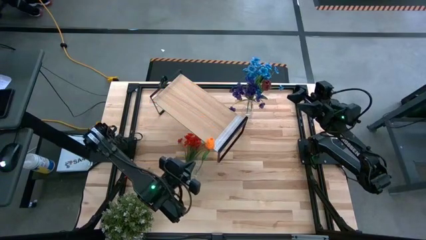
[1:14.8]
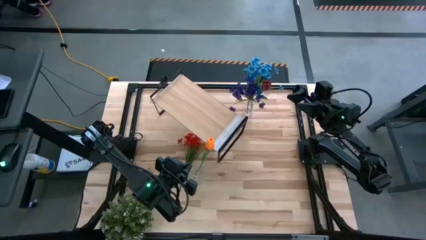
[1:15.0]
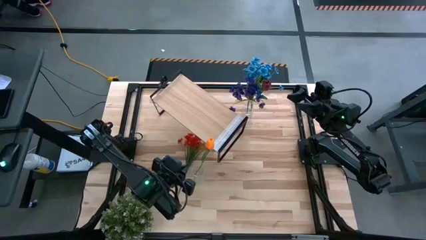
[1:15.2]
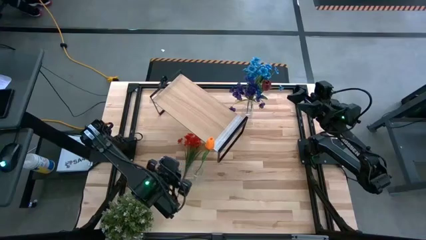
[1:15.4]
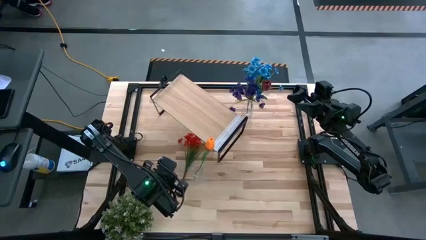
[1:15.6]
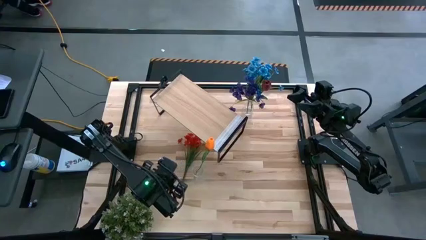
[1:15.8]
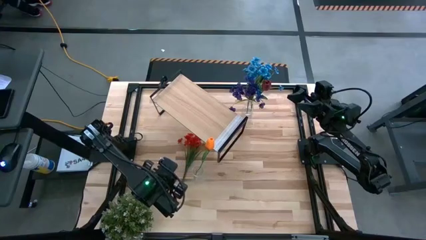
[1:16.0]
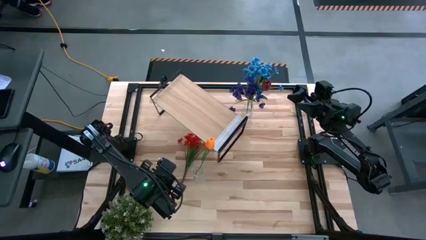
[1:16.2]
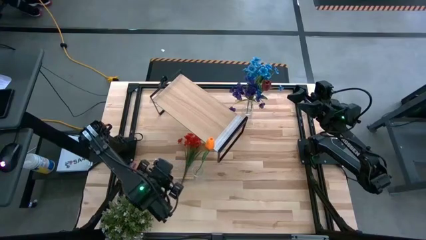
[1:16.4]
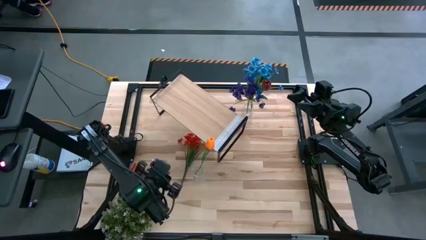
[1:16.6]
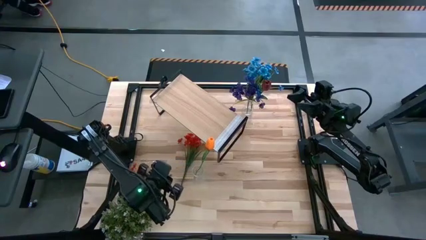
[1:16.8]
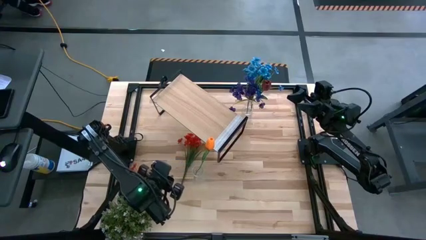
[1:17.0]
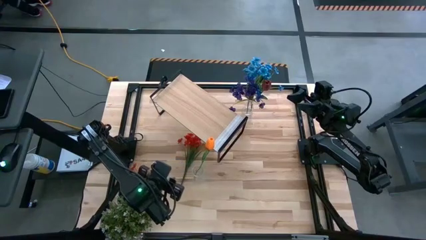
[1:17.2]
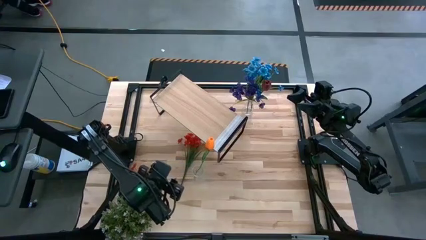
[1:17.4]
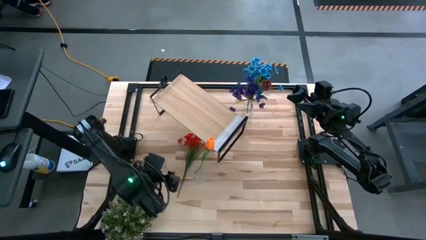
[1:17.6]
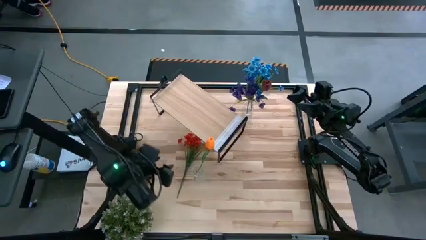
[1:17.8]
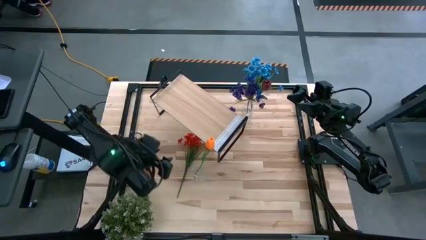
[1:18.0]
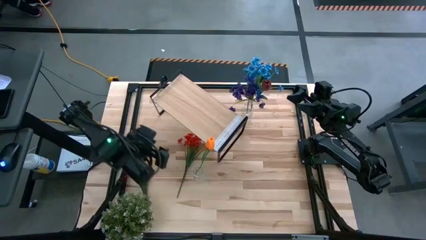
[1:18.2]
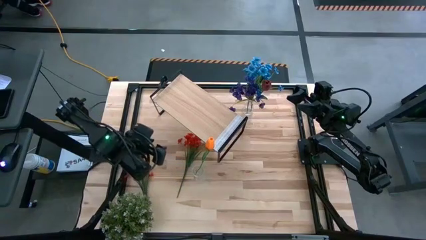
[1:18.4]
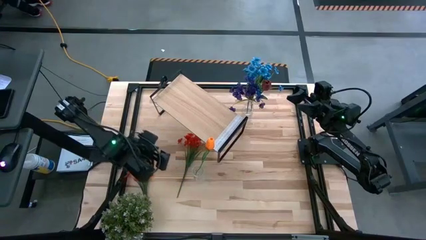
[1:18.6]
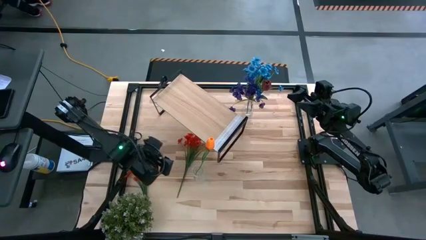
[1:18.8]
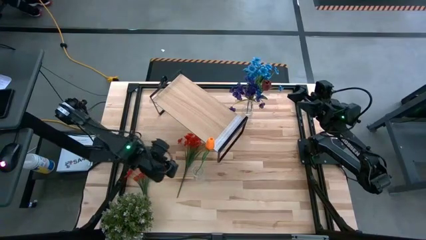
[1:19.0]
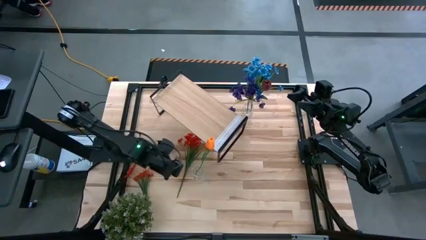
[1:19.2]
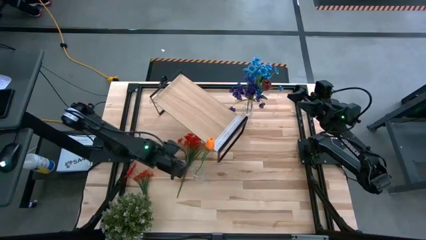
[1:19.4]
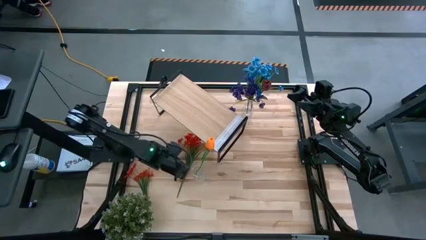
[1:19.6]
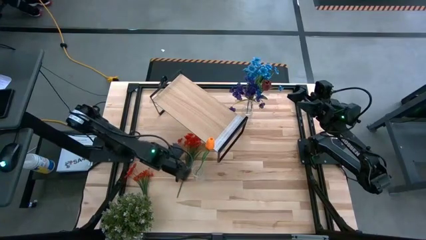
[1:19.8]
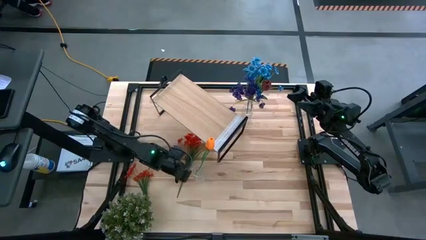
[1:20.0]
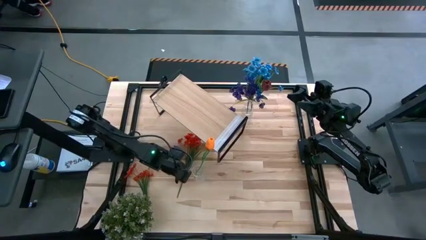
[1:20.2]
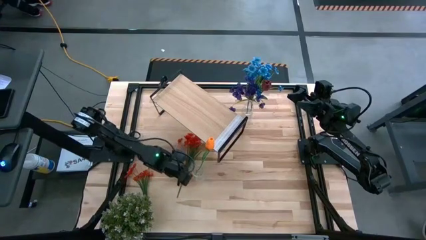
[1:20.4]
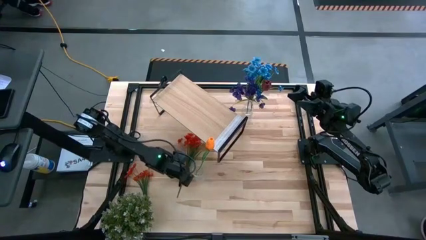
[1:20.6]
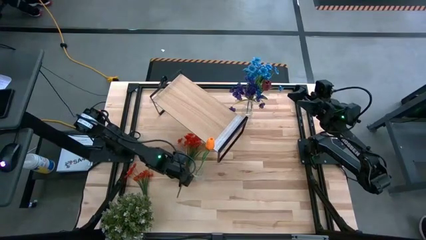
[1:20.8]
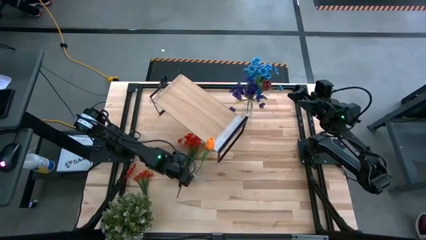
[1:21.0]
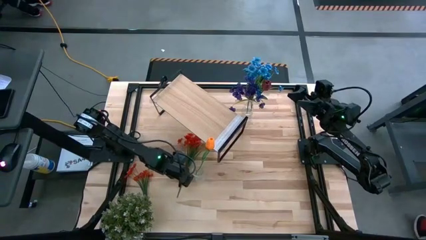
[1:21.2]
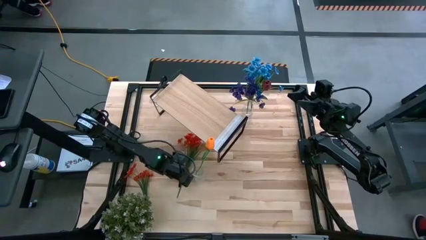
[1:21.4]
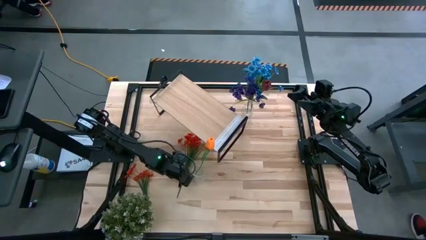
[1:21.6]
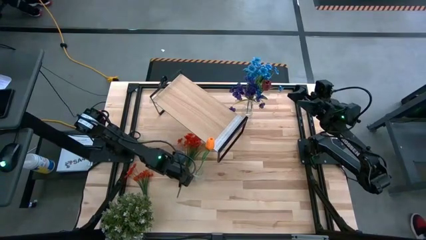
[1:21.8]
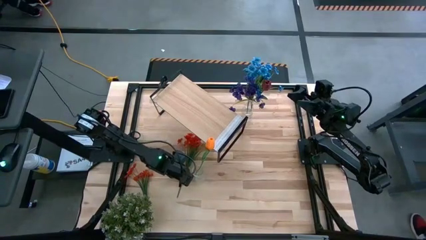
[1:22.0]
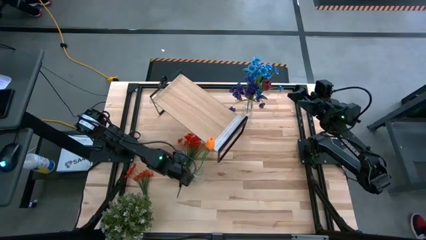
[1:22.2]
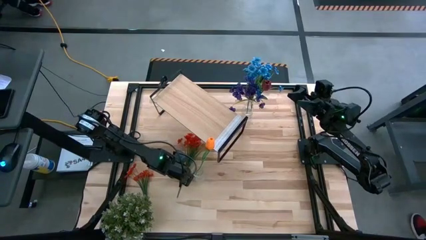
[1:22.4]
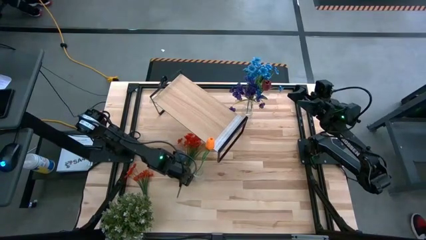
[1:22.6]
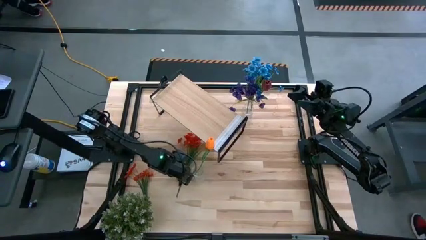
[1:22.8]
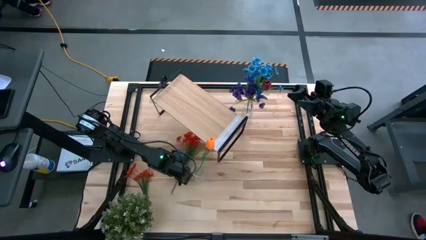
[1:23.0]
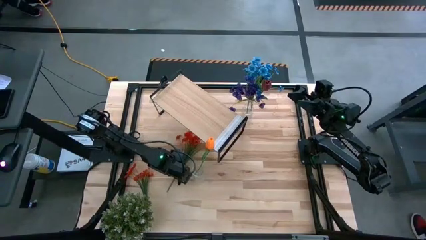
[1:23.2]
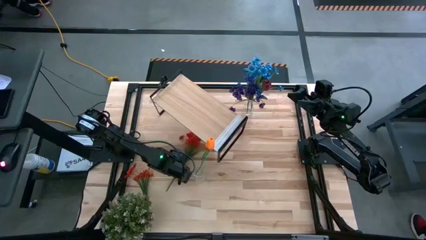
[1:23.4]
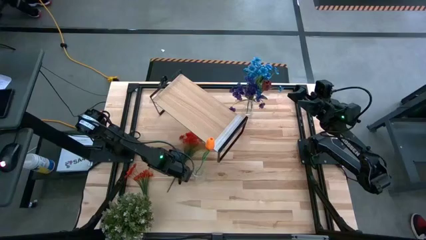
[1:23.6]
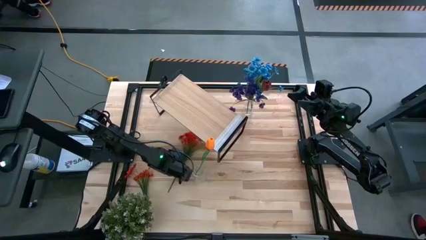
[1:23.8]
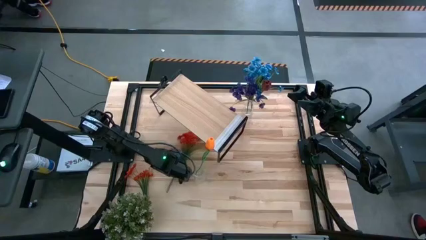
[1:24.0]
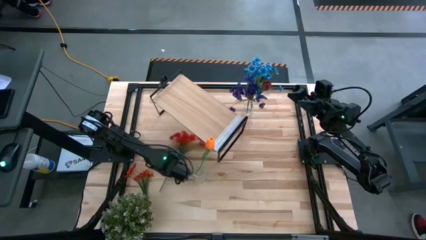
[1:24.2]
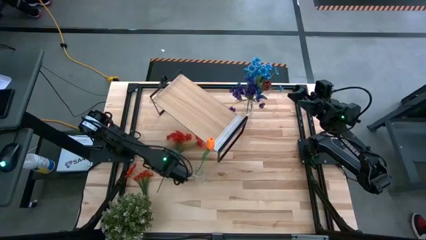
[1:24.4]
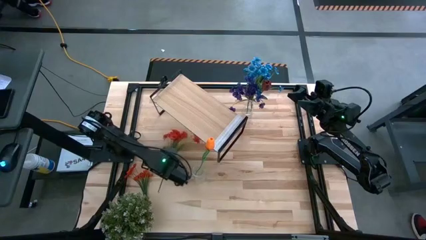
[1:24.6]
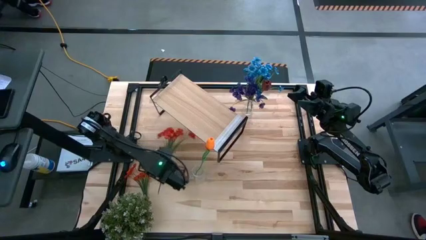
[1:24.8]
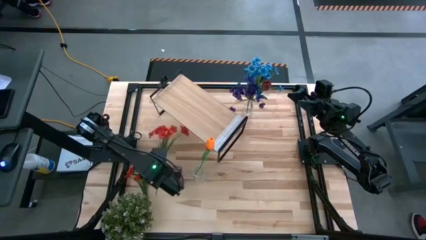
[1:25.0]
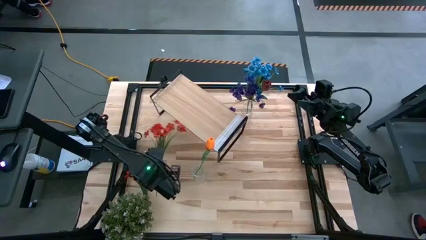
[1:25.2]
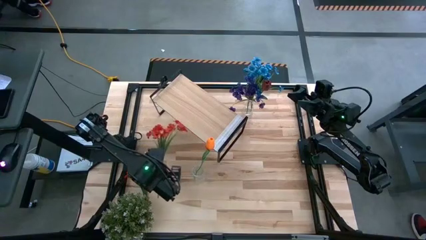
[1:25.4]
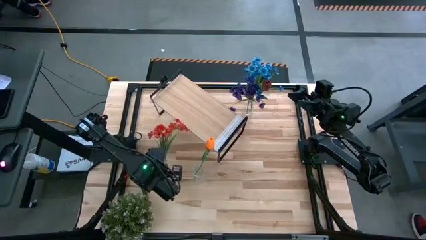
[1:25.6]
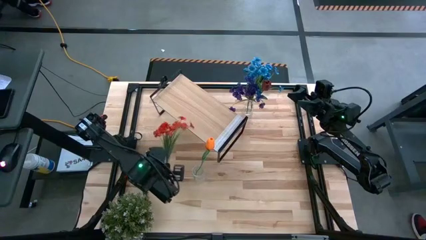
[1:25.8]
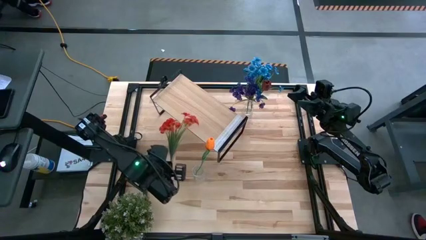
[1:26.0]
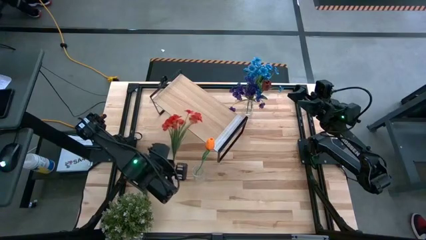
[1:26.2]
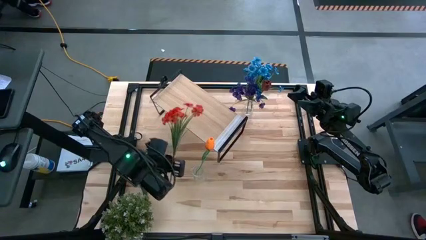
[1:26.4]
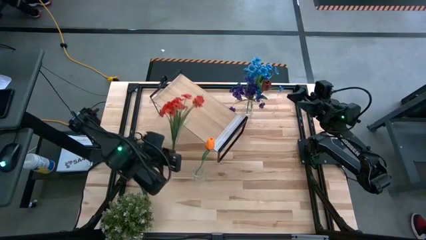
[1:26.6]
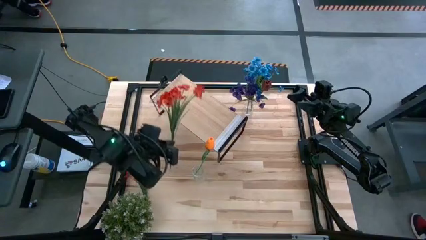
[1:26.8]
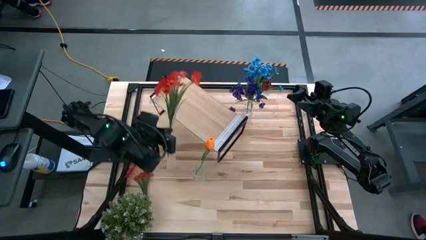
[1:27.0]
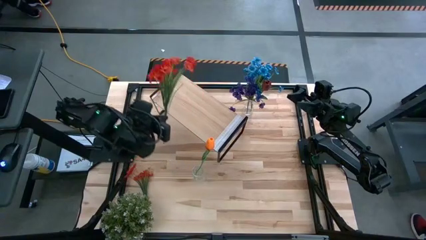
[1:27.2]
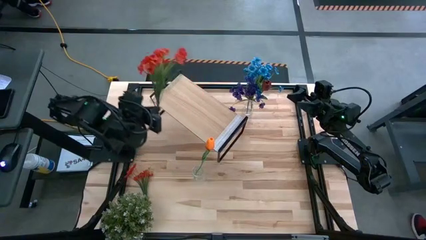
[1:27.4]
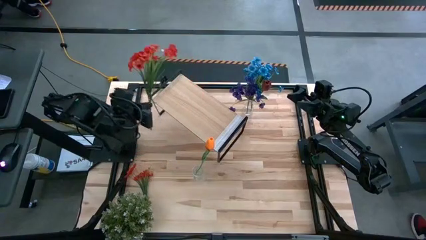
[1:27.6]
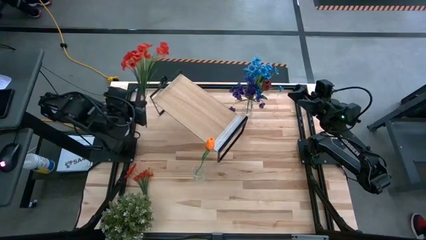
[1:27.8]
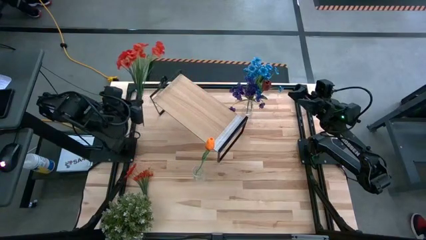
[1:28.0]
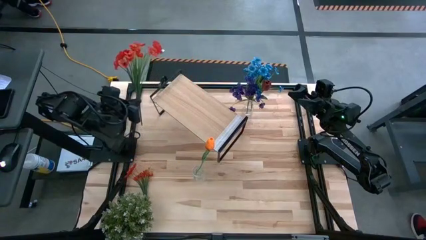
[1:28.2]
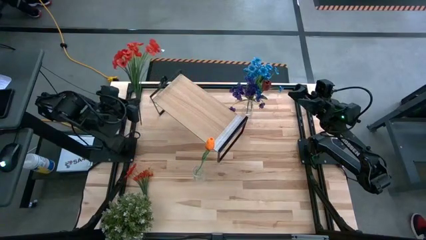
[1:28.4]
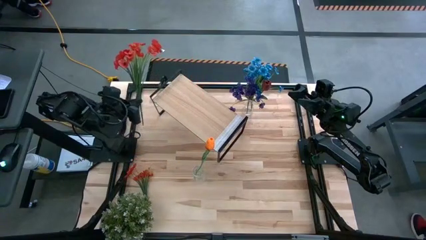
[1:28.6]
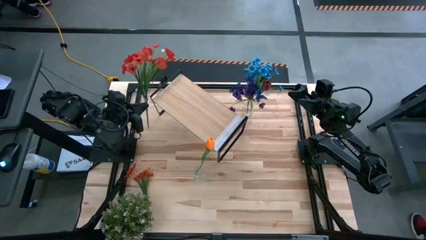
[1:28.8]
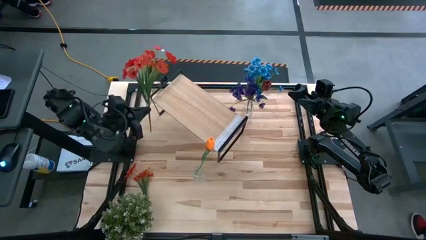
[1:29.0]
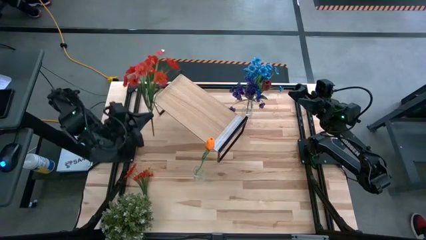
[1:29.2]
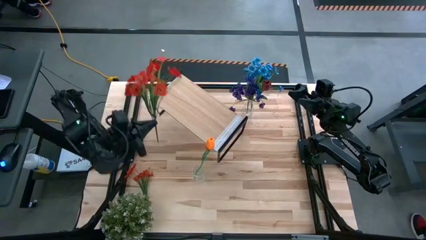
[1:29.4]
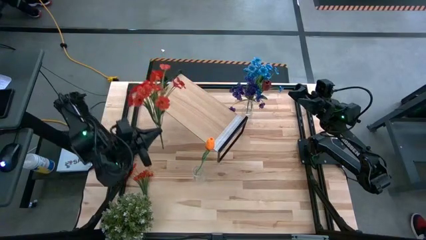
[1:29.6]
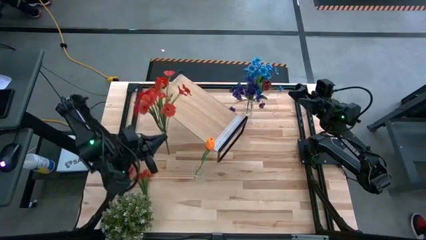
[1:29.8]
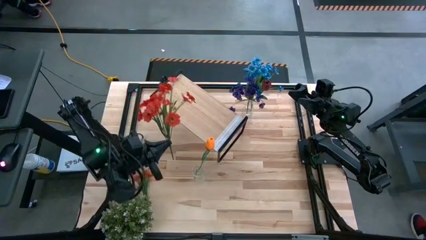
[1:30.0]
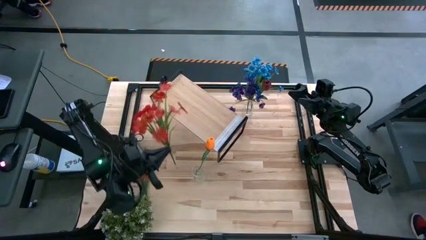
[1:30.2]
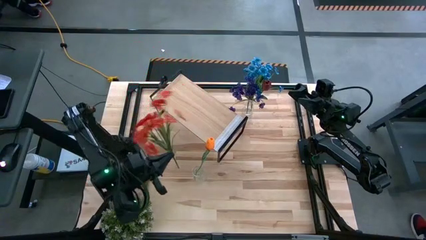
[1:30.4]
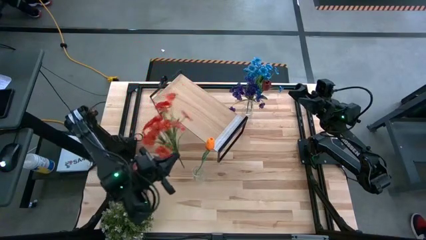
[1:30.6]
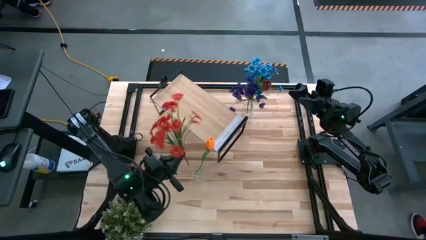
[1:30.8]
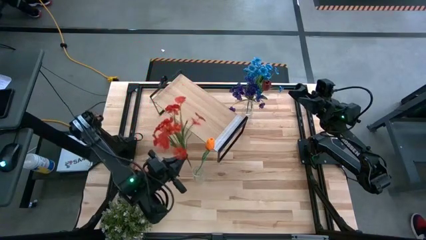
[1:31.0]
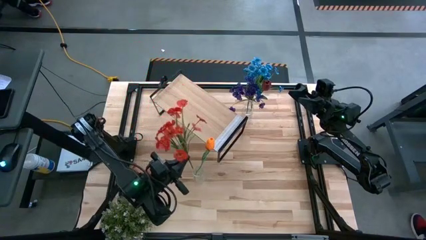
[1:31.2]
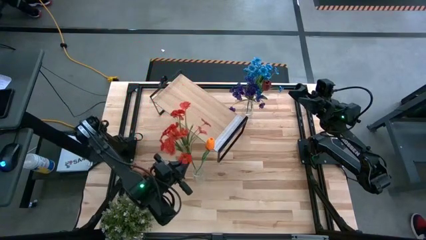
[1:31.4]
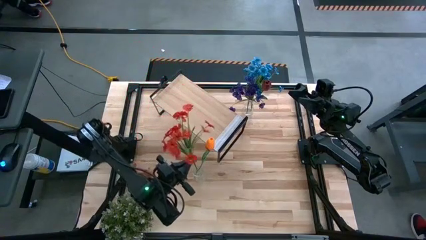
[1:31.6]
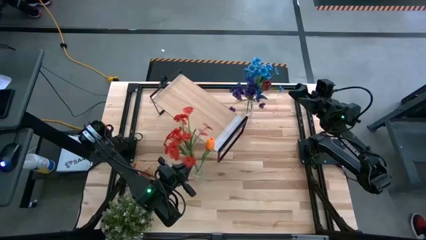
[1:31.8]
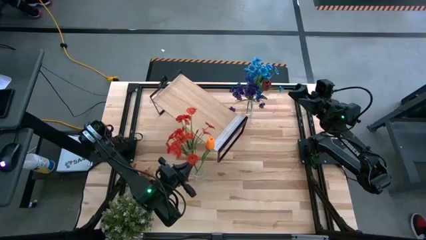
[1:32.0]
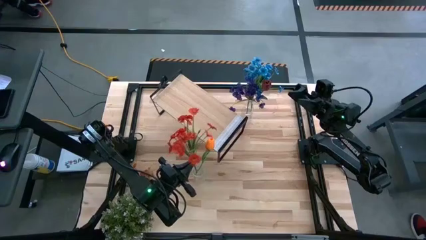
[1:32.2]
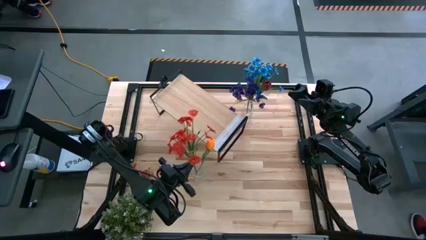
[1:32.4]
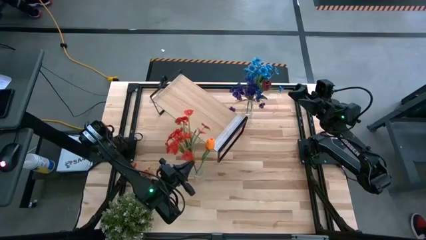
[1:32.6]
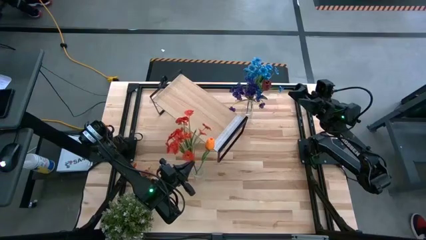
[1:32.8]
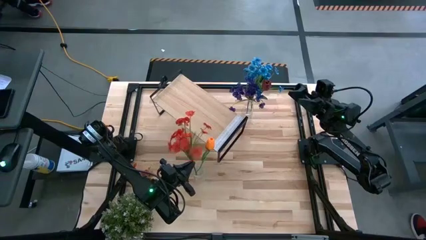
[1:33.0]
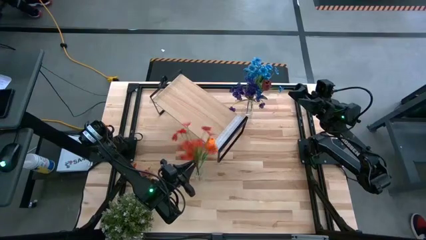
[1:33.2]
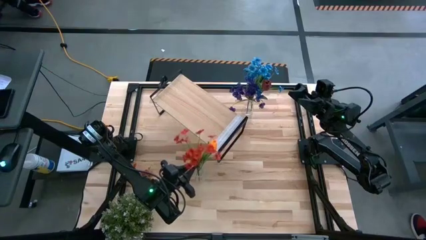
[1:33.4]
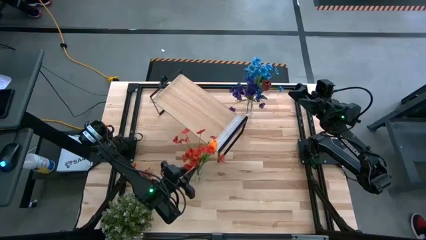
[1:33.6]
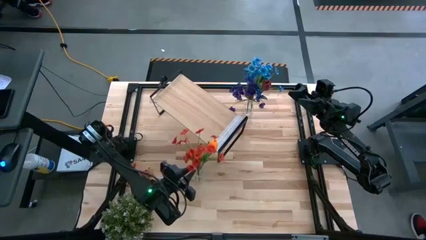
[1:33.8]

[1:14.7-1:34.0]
Task: Pick and place flowers into a vace then onto a shelf
Put the top orange flowers into the bottom transparent flower vase
